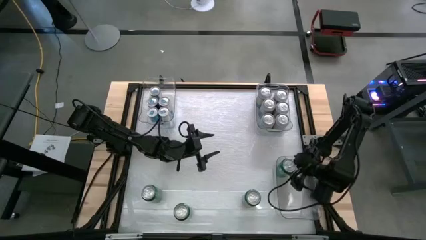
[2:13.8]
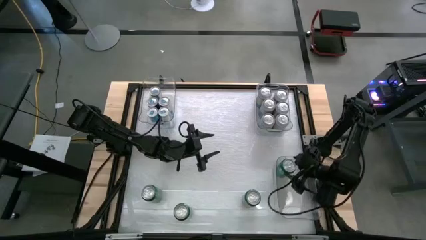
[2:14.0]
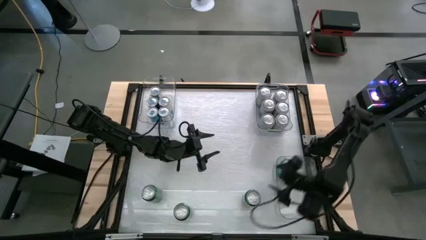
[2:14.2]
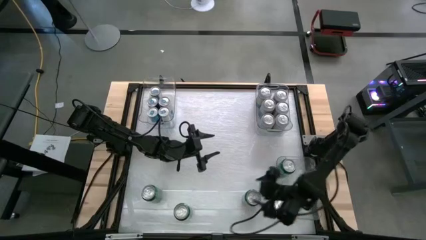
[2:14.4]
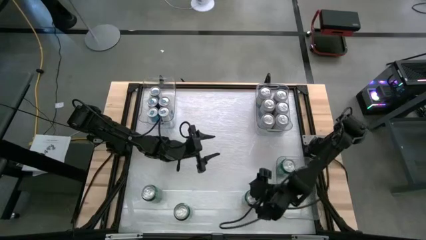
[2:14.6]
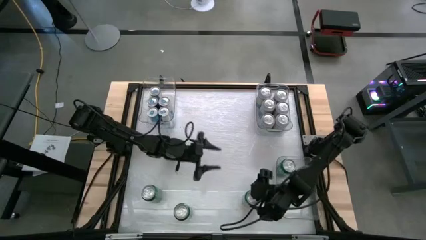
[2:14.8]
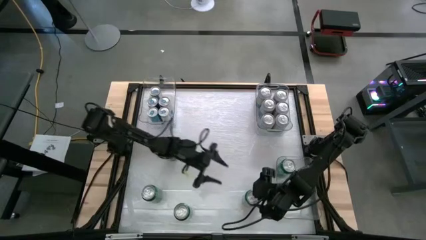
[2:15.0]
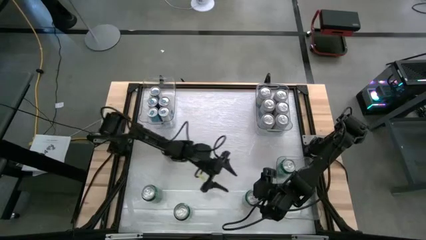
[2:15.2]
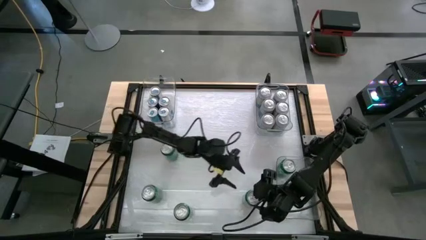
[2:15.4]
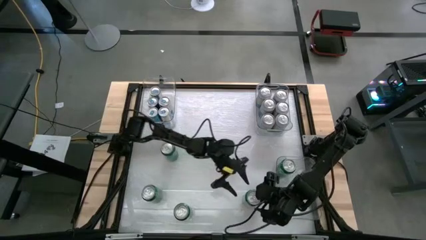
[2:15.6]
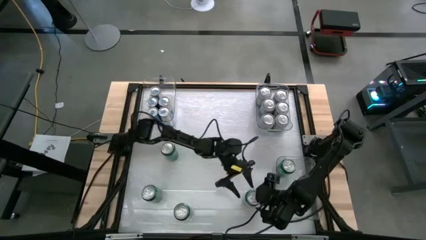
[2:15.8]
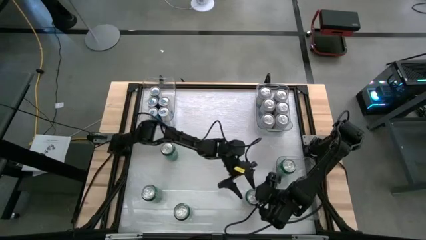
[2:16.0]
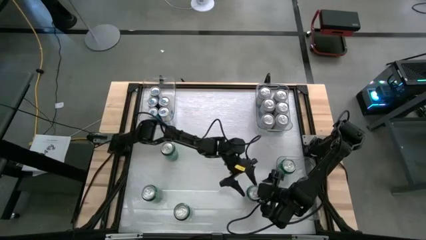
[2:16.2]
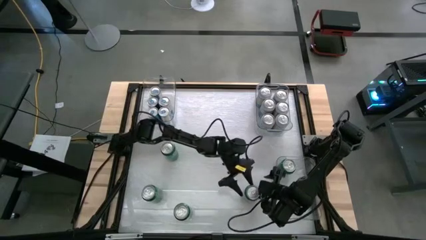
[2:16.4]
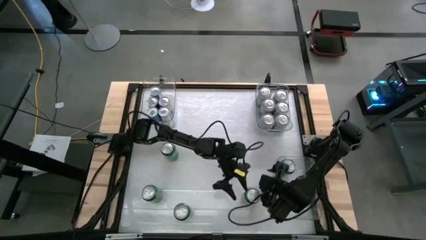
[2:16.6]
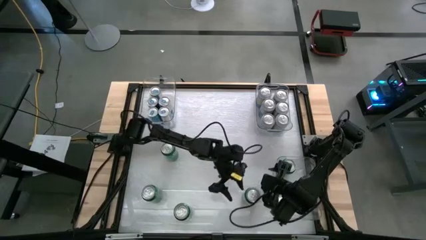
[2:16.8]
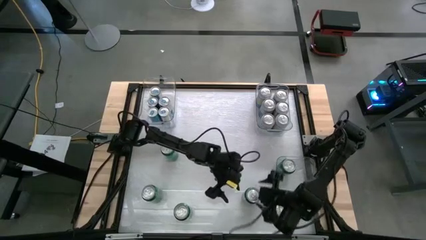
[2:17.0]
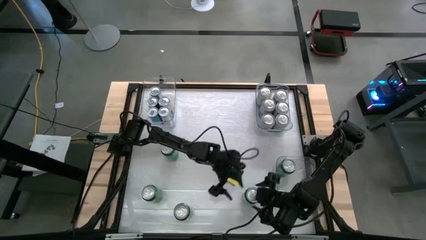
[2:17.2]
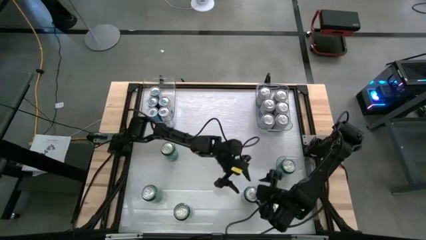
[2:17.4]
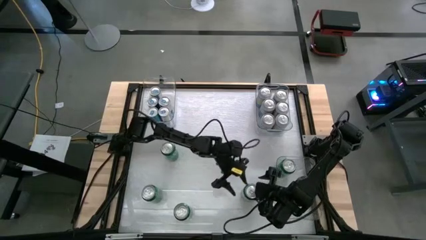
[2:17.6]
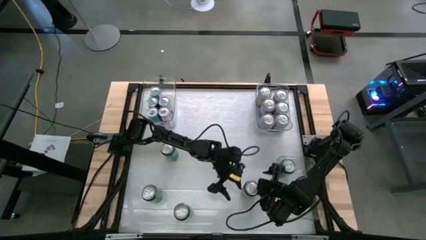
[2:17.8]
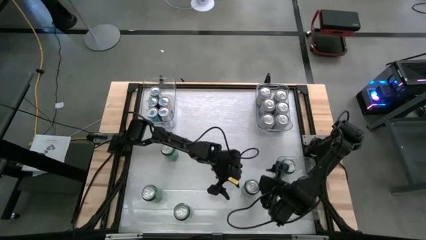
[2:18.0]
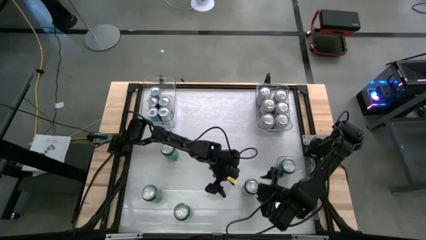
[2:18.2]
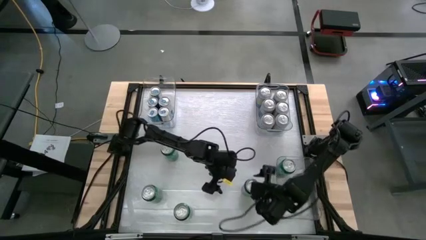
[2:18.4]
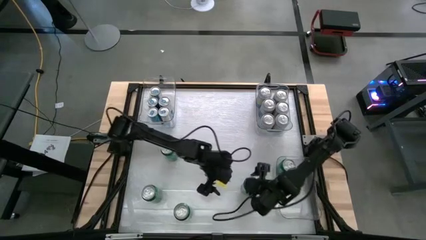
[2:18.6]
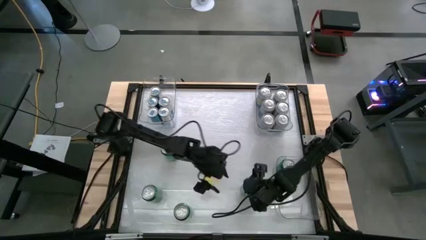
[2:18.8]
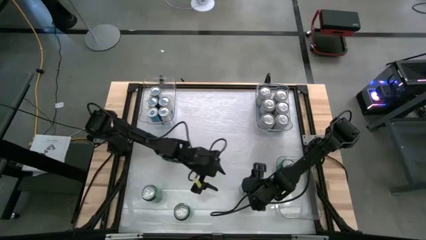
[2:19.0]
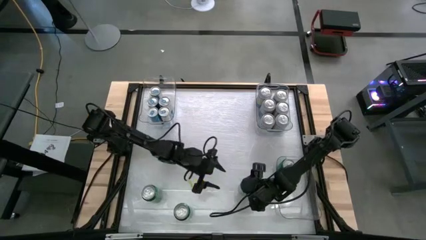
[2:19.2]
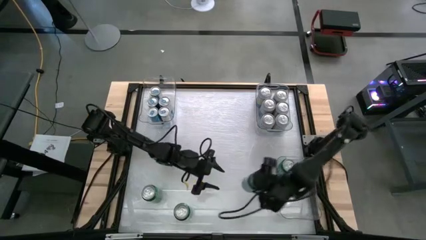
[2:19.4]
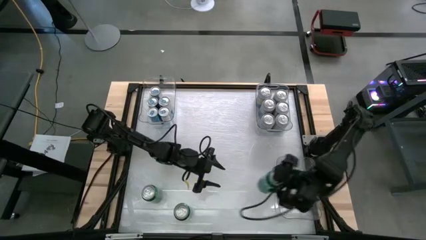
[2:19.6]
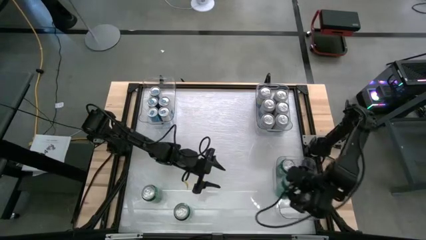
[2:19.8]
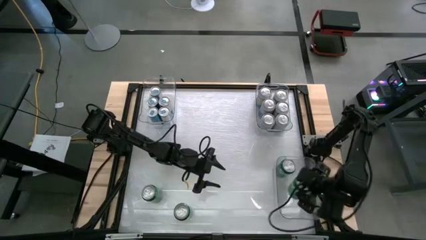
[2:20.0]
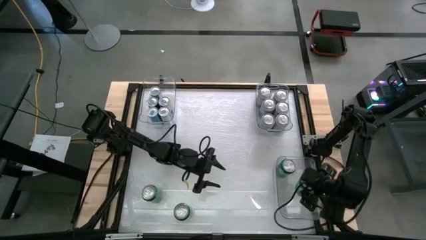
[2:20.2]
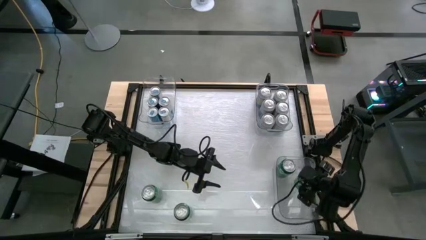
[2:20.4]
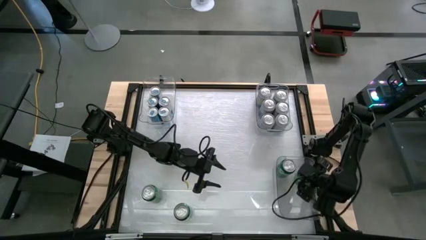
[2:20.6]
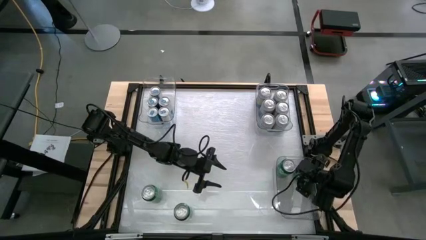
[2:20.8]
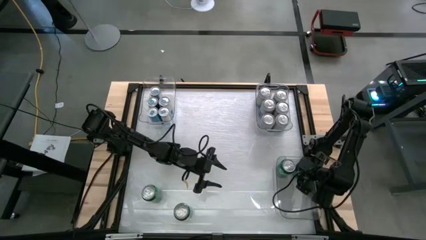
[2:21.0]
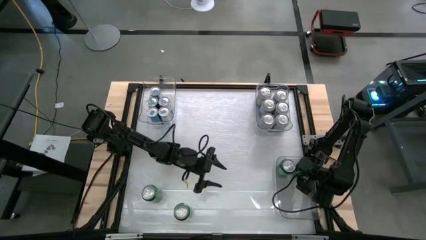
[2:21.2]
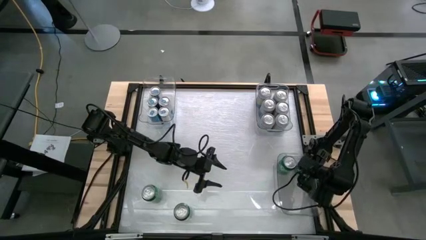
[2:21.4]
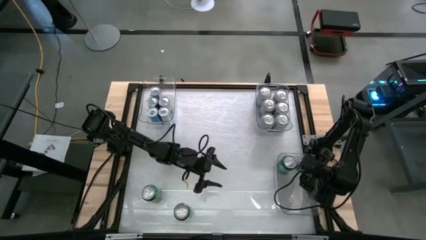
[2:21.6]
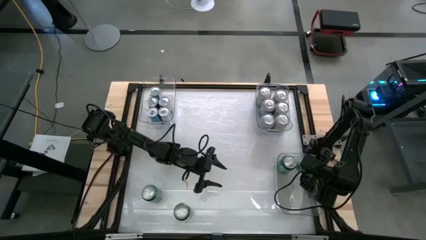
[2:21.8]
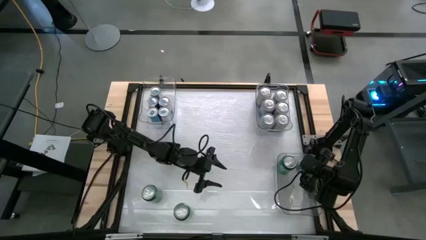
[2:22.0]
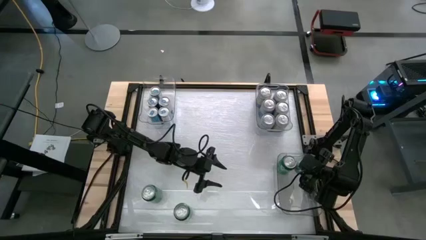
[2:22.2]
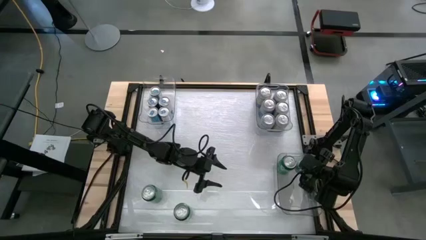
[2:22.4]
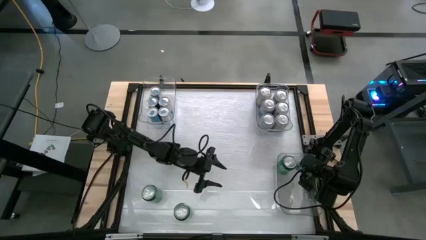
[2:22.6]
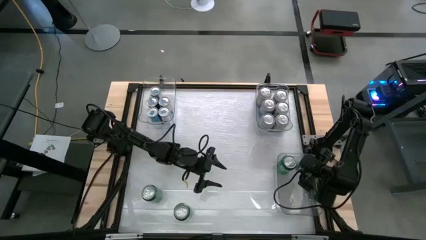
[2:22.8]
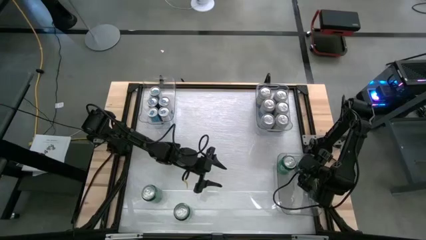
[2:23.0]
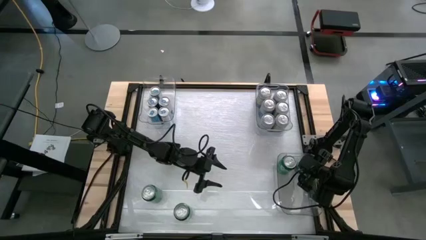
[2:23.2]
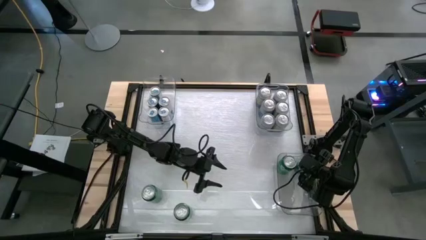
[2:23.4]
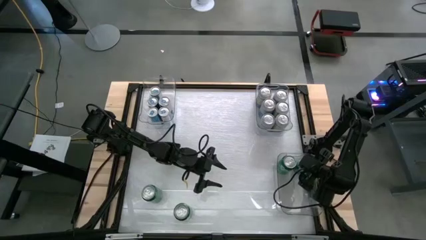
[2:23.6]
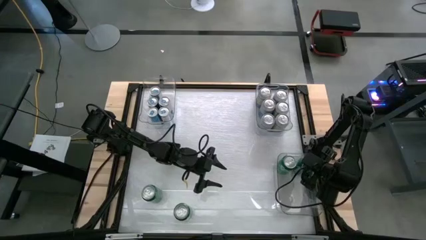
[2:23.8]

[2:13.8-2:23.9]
Task: Sort soda cans
Put the green soda can into the bottom transparent bin

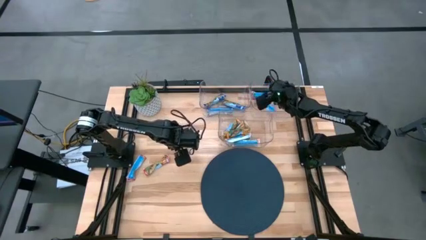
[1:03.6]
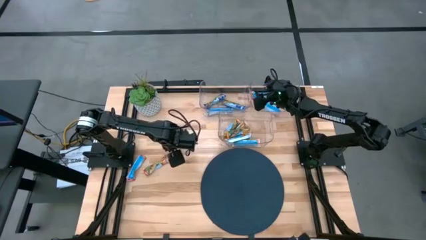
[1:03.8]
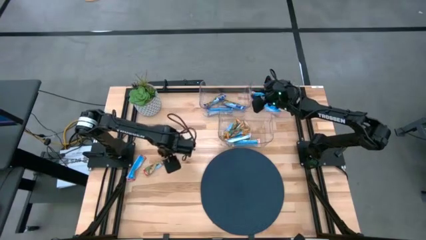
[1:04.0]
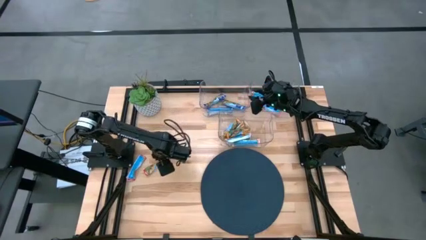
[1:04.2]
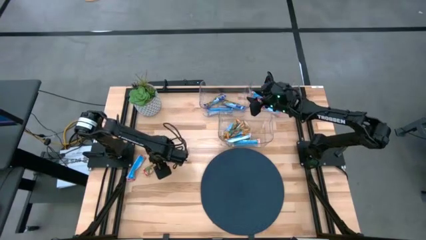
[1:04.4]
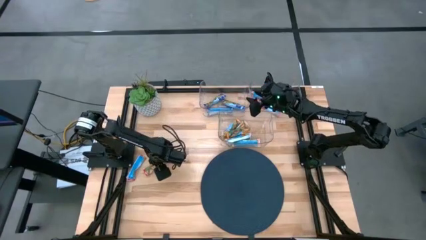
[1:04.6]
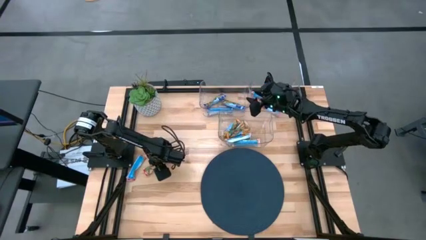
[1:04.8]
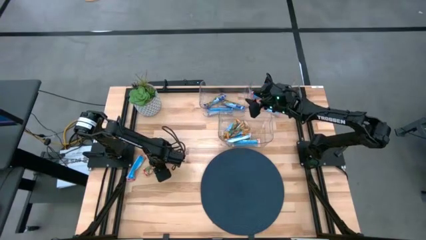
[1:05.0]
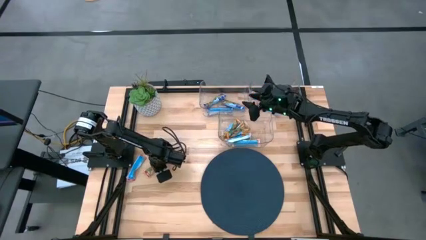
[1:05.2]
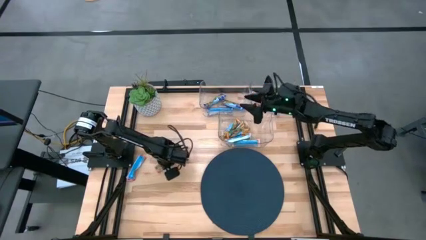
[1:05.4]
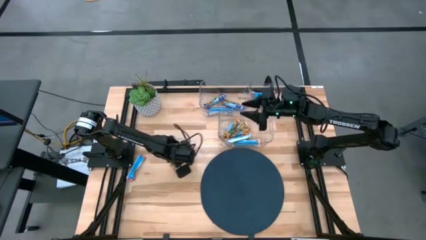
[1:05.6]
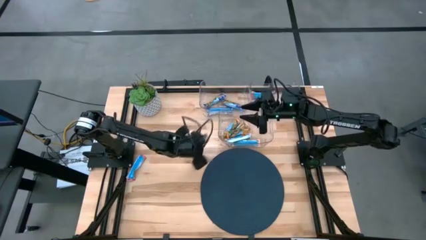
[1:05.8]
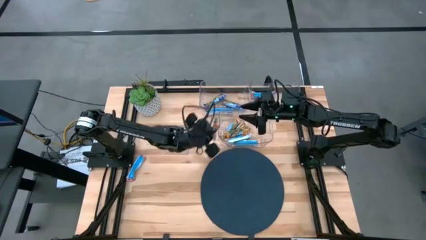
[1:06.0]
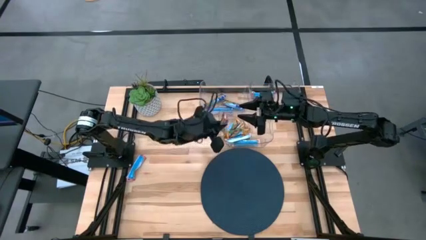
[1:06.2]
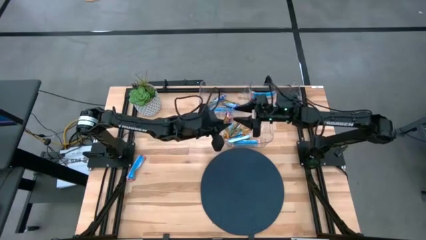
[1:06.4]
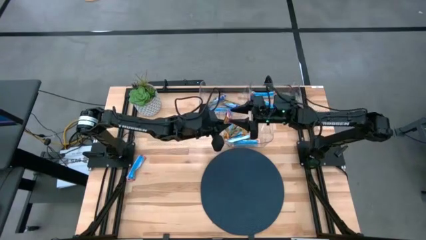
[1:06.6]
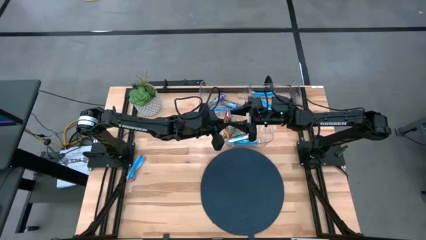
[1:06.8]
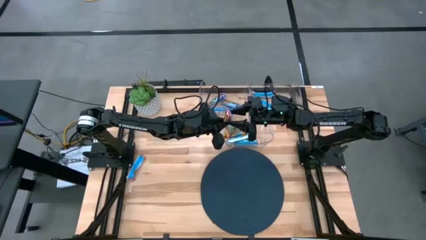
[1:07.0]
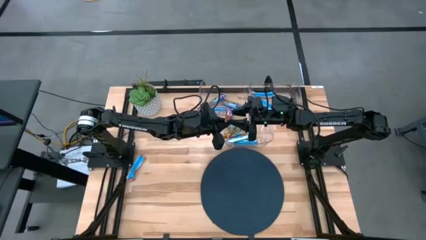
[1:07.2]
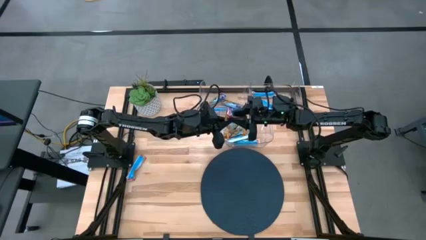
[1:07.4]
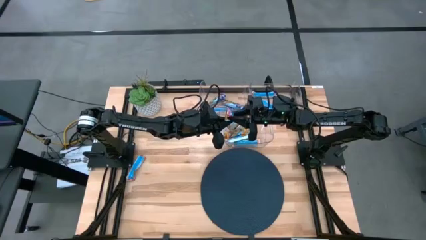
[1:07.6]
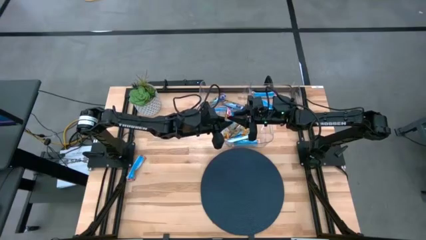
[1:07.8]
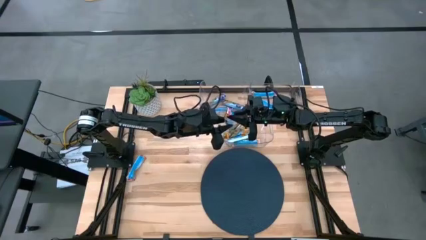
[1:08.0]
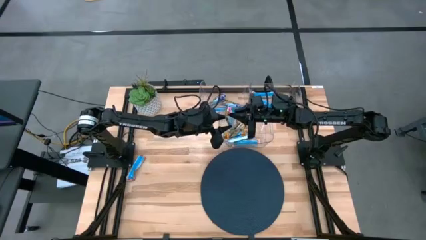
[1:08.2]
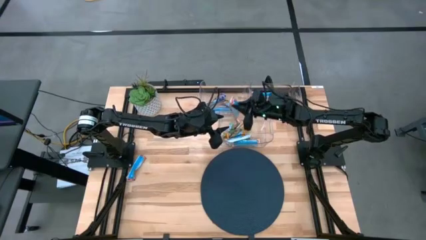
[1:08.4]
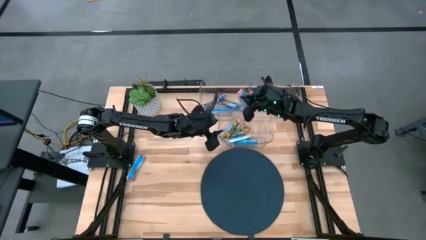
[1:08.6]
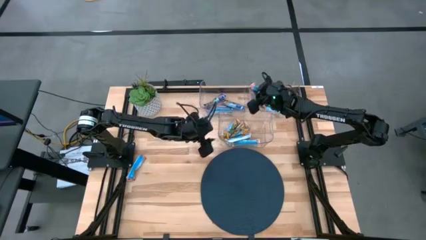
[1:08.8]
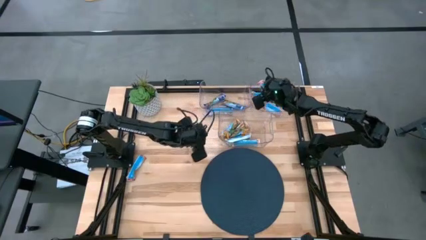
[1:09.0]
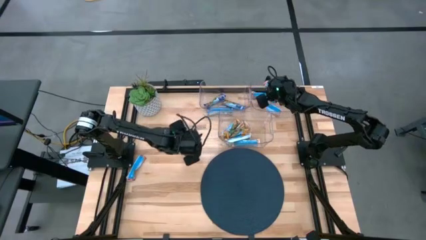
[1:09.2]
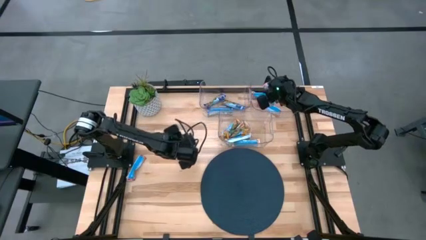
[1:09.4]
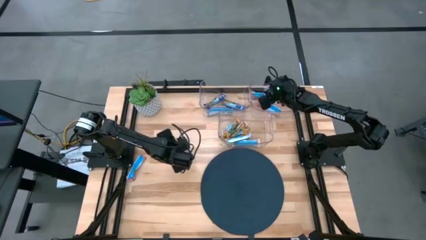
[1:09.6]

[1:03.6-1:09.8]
Task: Pick and place Granola Bars by type
Put the red granola bar into the top right transparent bin

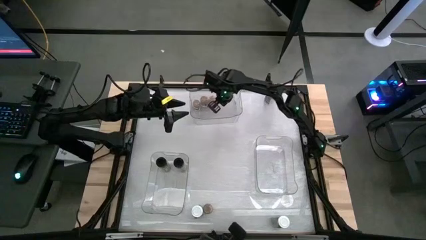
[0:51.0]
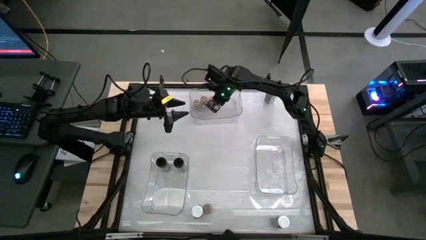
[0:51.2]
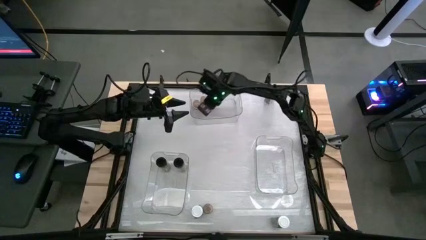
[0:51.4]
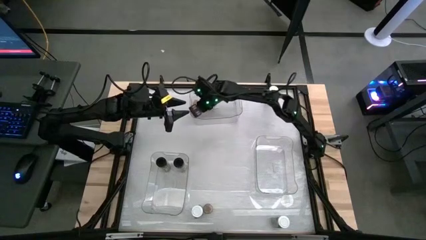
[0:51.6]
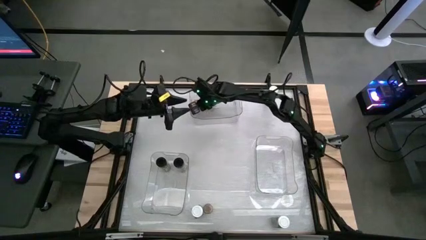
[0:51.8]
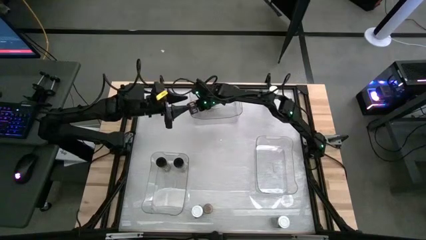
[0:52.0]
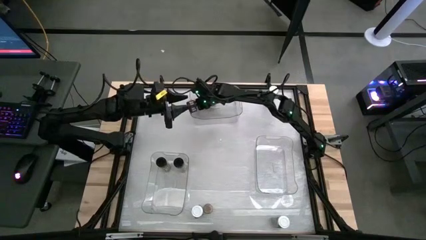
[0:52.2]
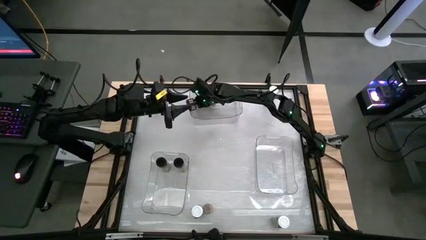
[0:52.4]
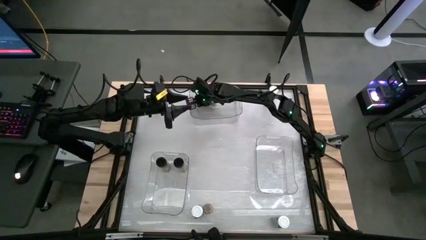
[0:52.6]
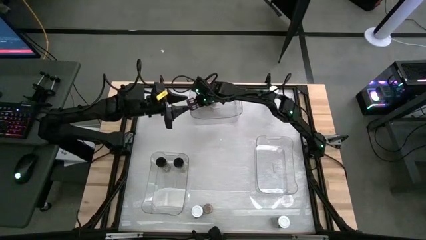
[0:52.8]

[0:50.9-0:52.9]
Task: Sort spices by type
Adjust the brown seasoning bottle in the middle transparent bin
